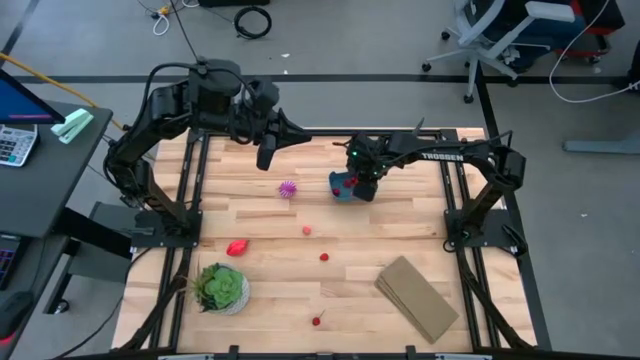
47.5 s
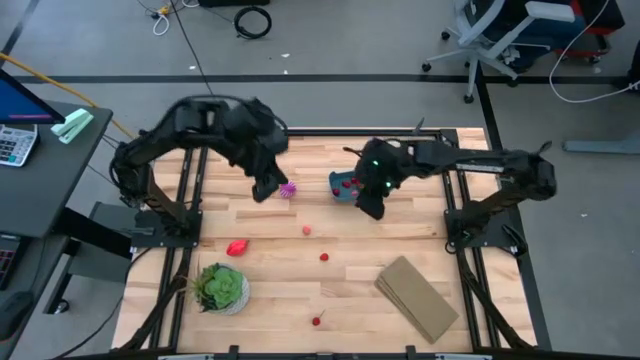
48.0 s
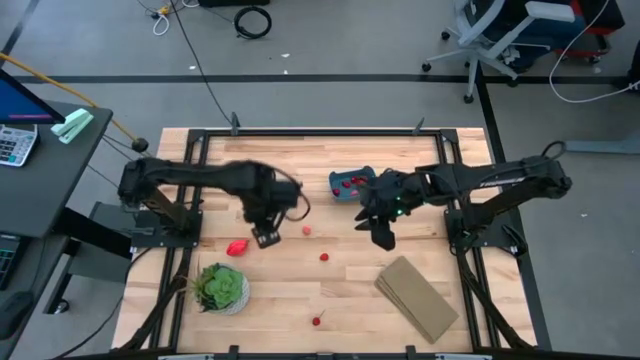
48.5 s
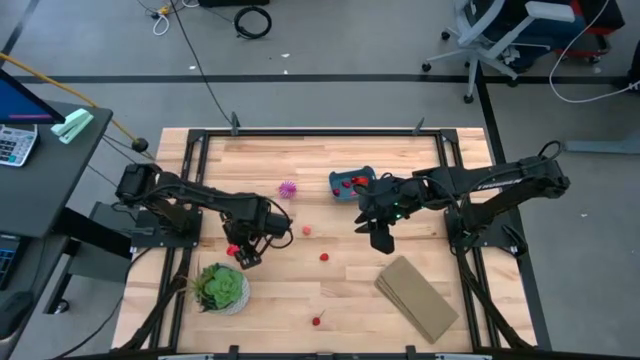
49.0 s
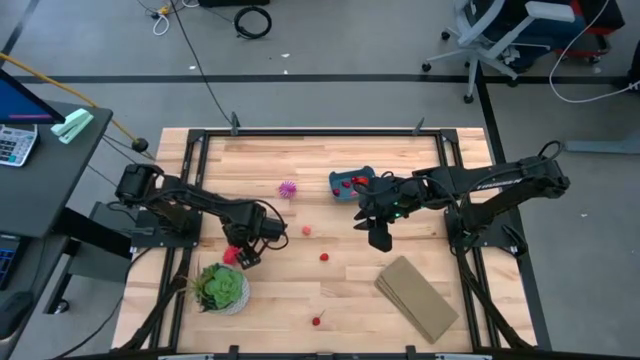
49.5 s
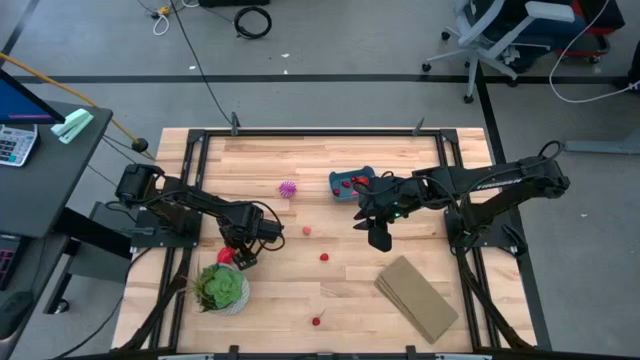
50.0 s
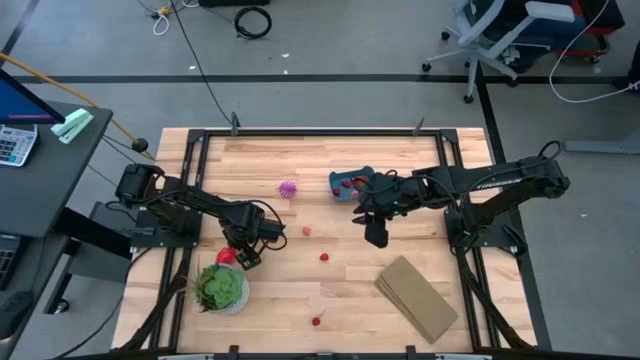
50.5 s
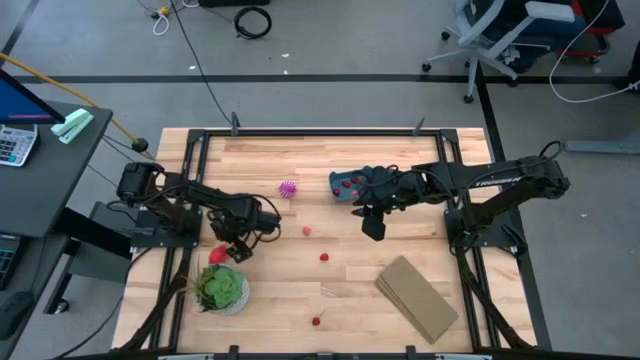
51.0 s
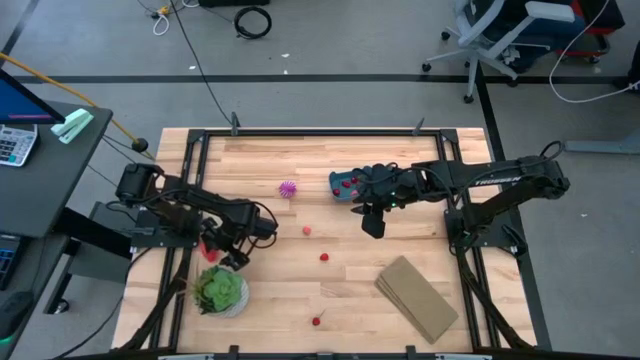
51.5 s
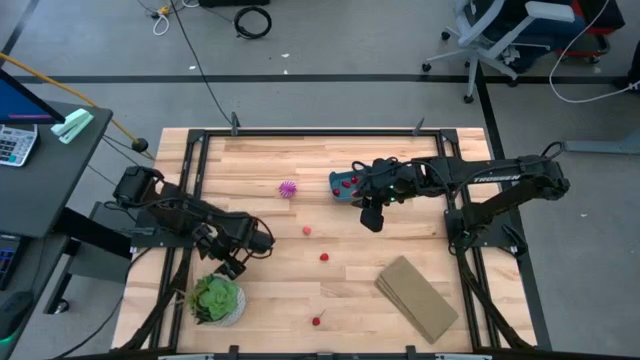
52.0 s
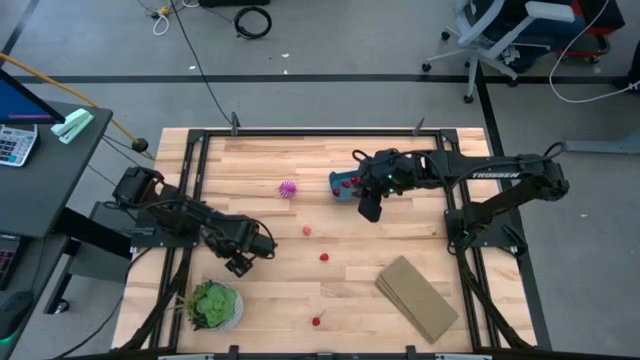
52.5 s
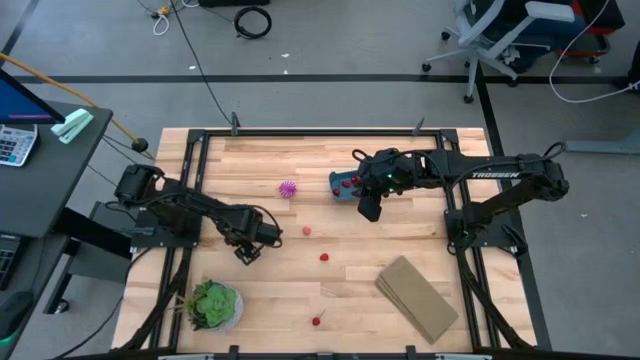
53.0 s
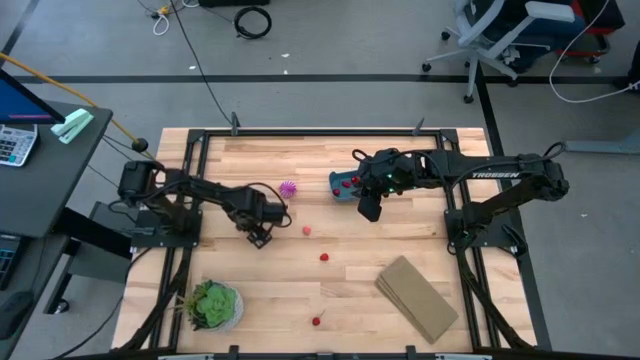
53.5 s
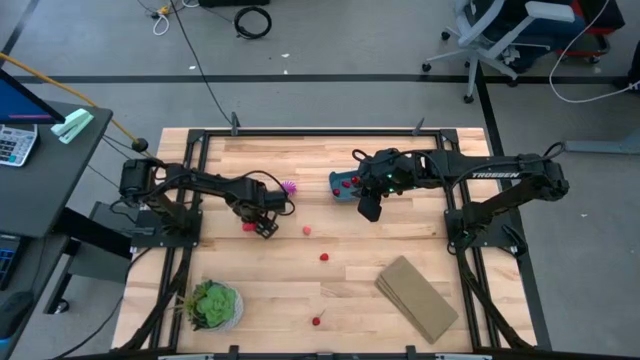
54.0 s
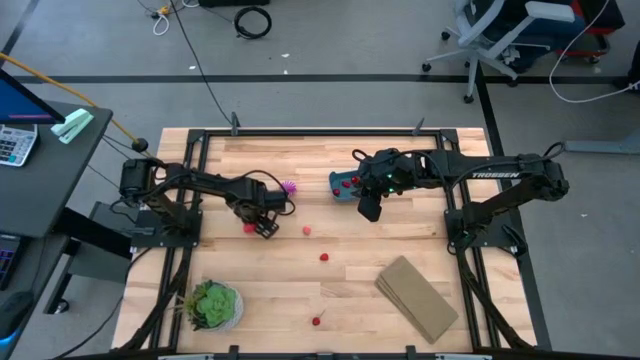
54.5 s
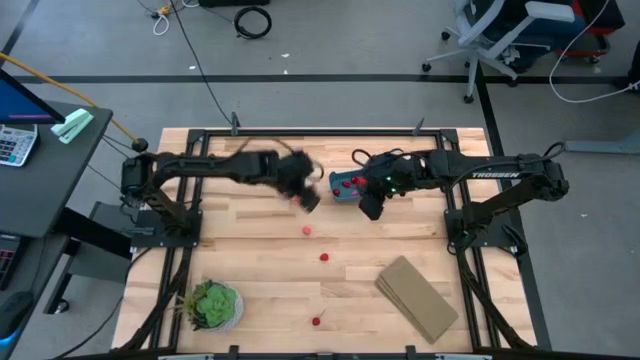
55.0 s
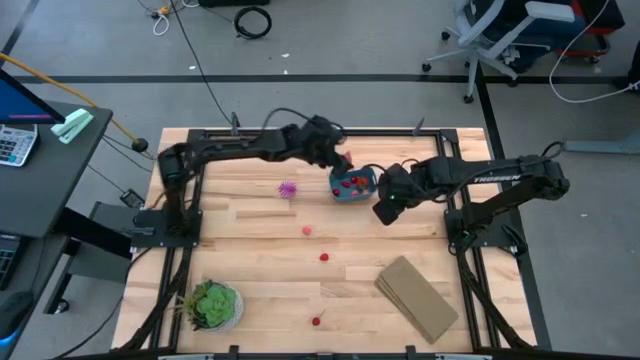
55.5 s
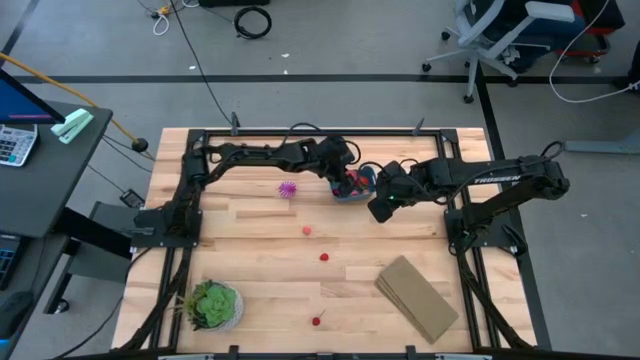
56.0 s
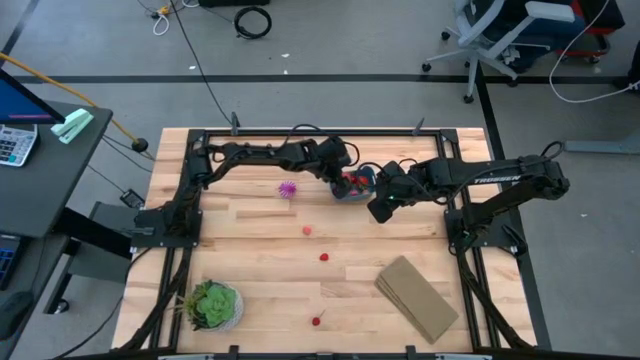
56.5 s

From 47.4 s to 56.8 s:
Task: Pick and placing Produce into tupperware
Put the dragon fruit into the bin

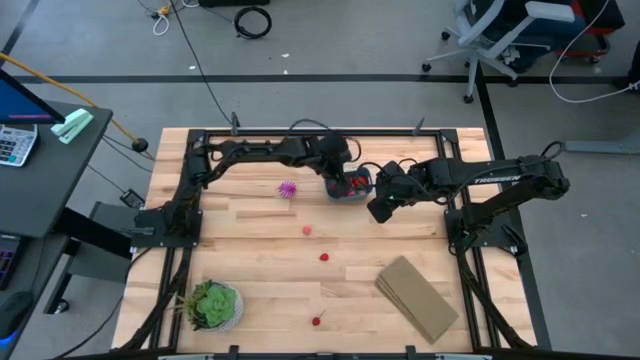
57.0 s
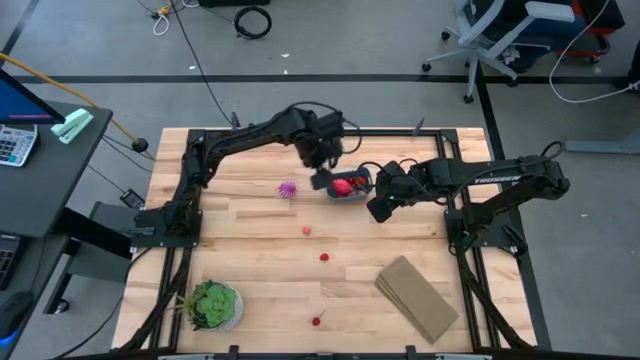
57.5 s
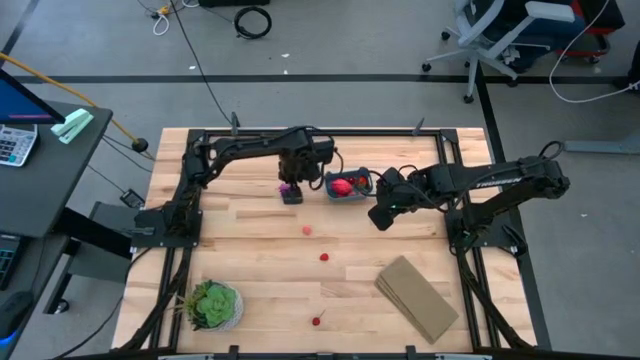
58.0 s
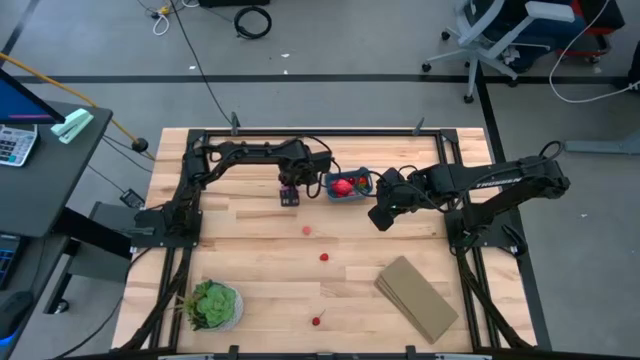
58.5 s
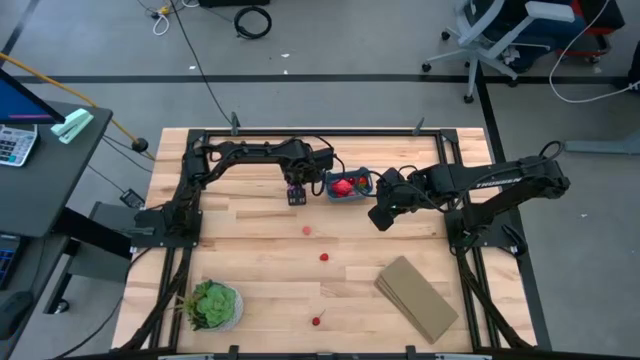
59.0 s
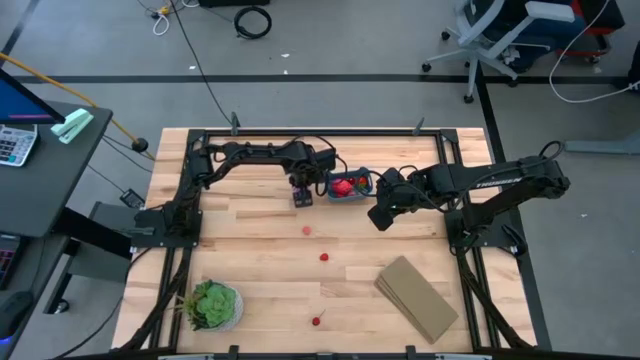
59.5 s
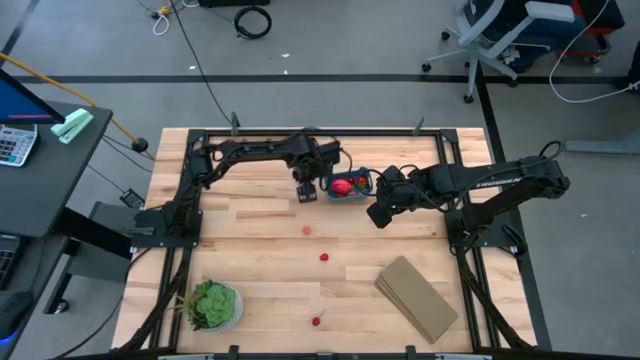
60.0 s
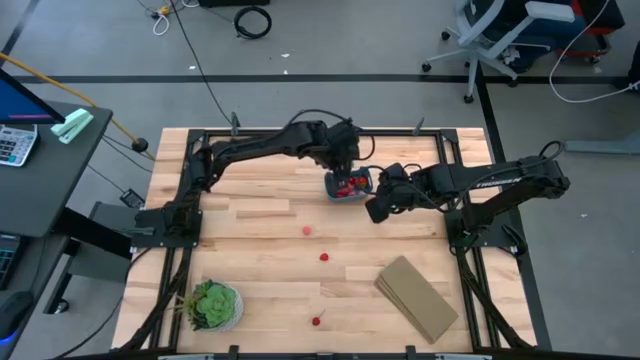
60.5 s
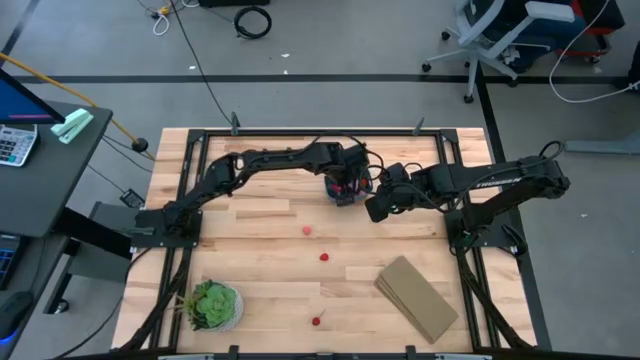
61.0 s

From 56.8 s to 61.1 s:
Put the onion into the bin

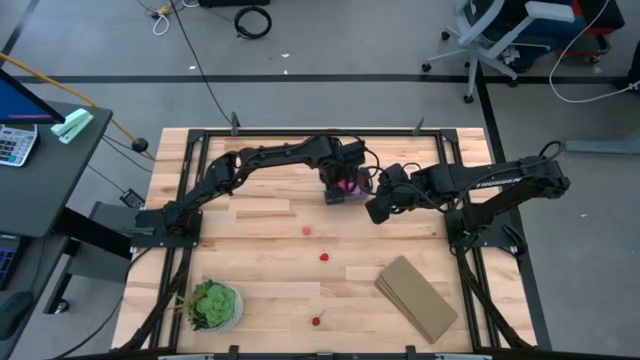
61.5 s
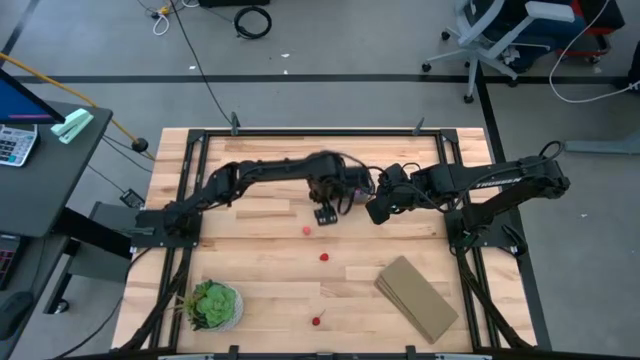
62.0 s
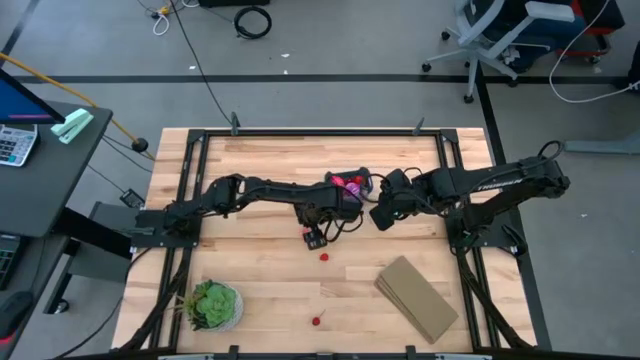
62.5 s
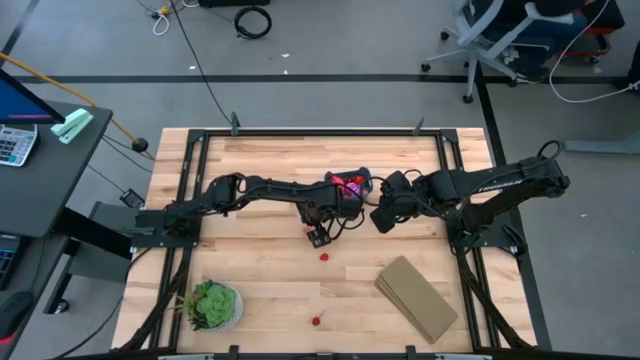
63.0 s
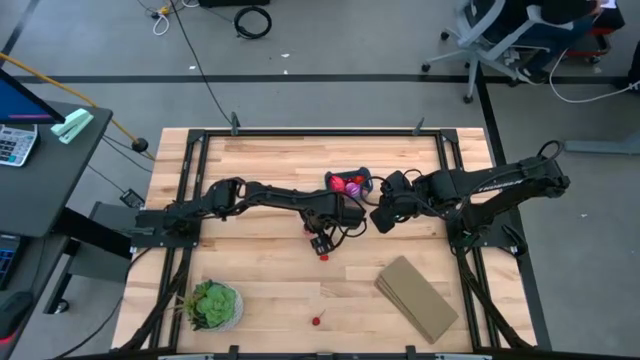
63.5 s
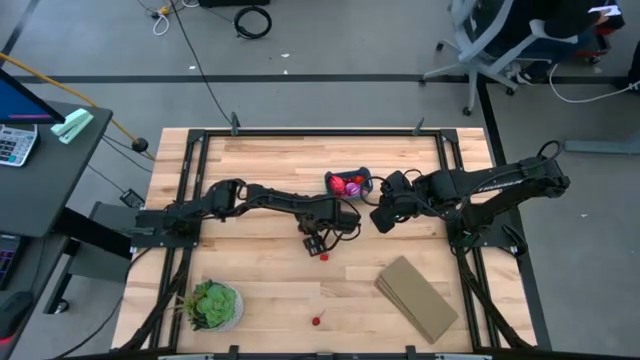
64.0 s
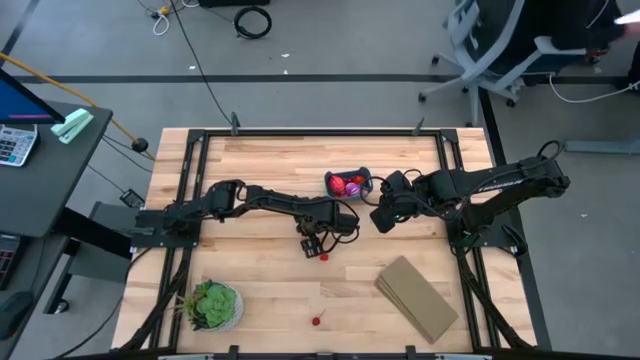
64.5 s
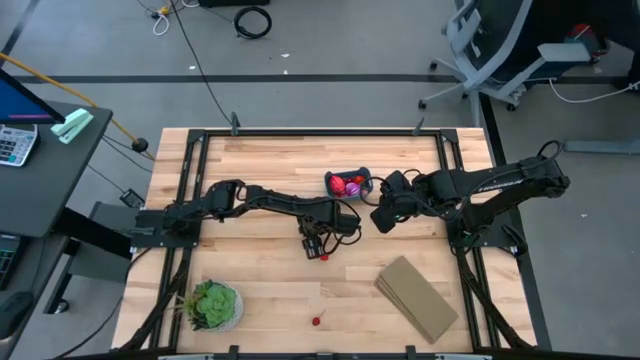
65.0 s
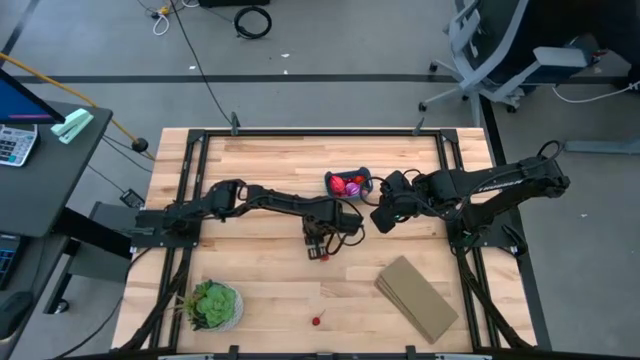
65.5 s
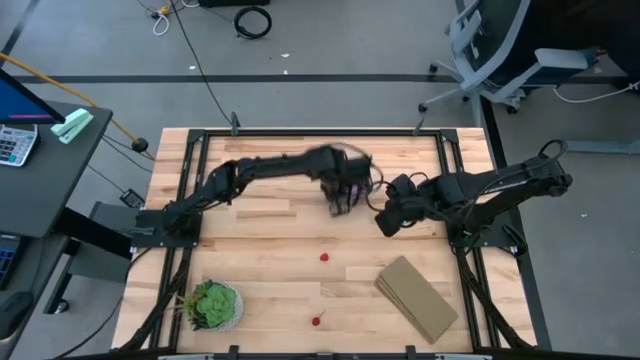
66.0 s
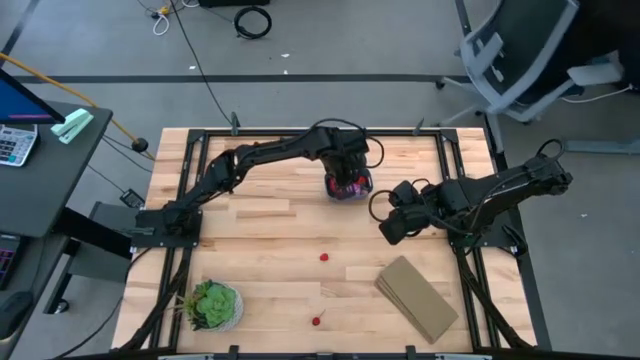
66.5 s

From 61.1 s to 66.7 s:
Put the peach into the bin

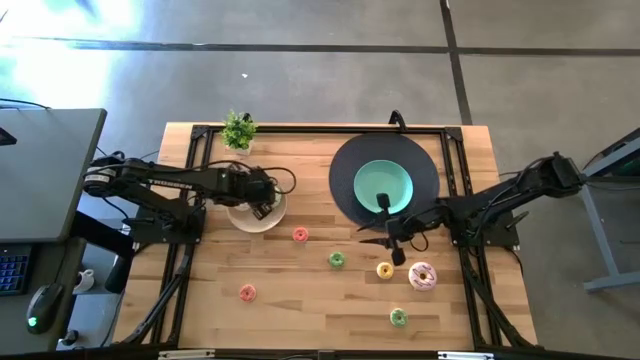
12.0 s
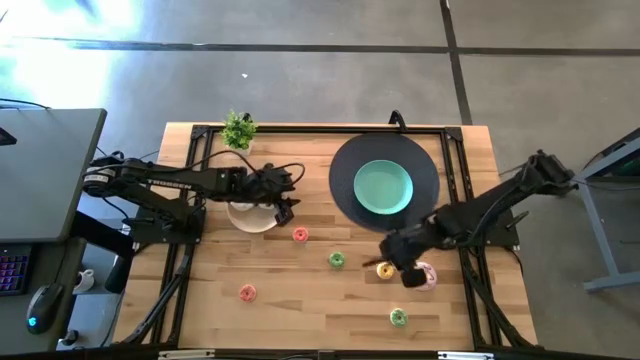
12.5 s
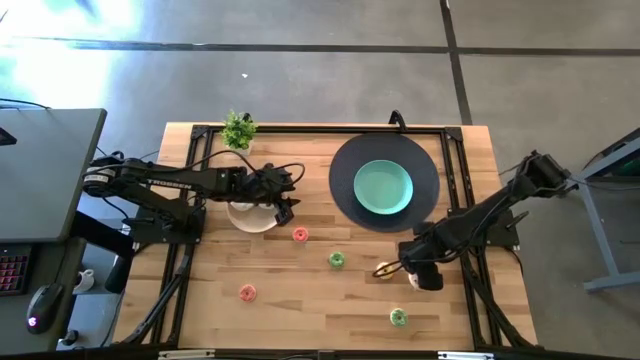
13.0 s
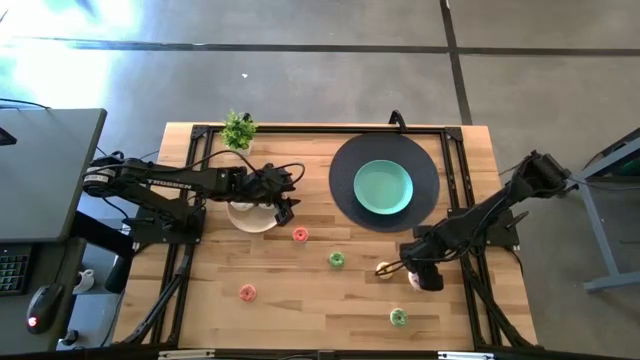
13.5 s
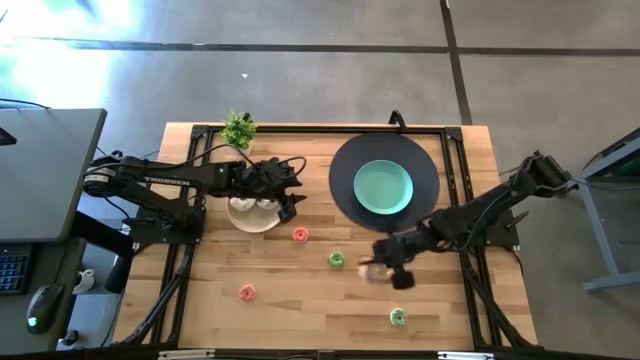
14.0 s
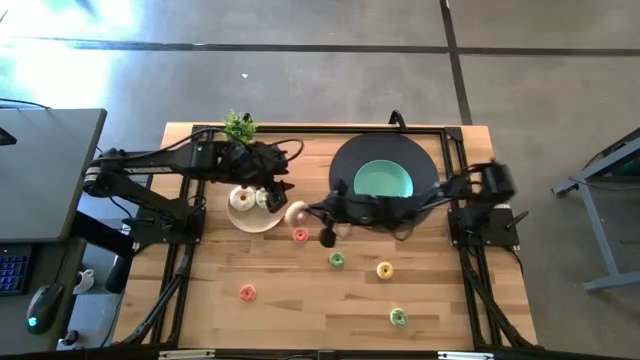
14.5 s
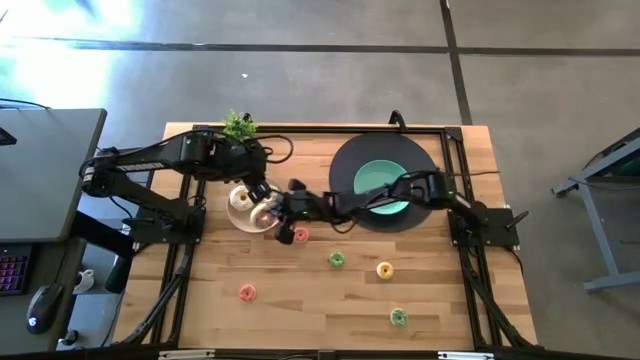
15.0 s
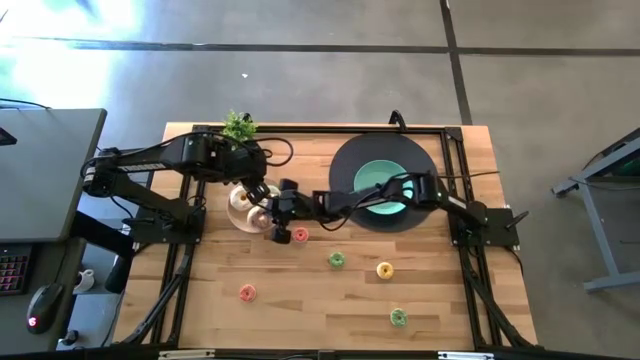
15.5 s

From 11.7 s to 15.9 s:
Task: Pick & Place donuts
Put the large purple donut on the white plate
